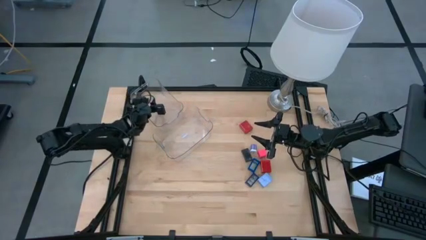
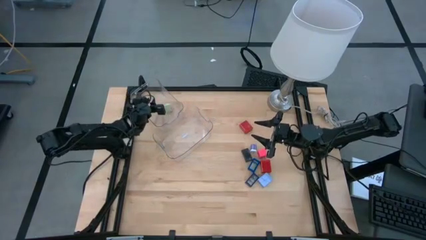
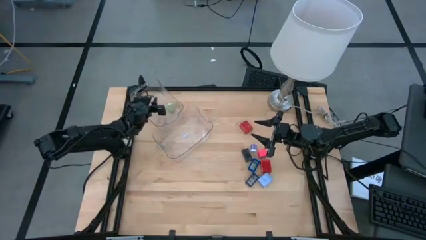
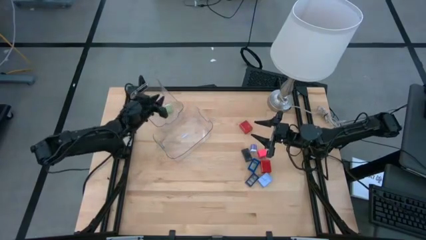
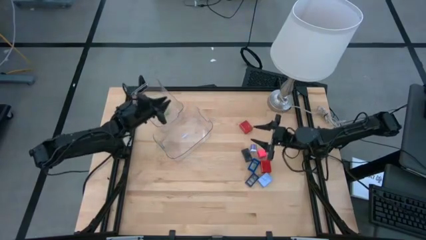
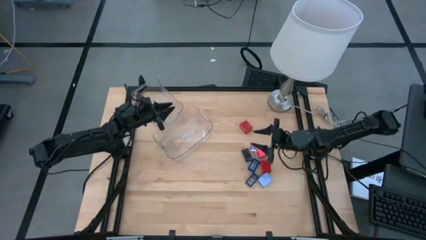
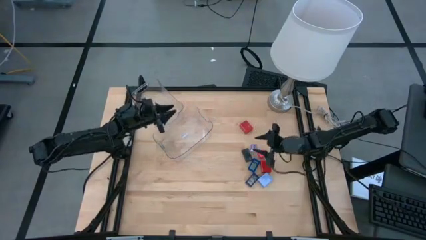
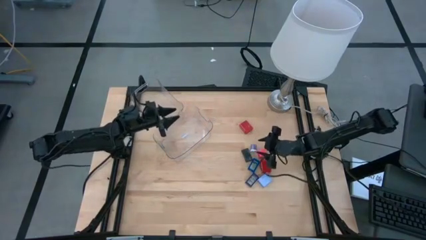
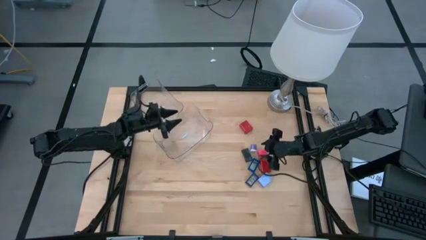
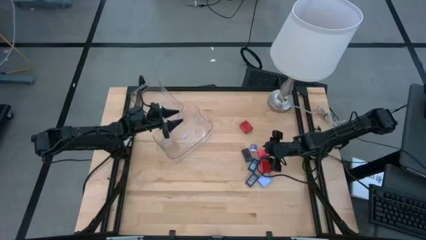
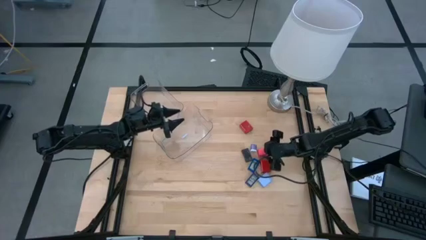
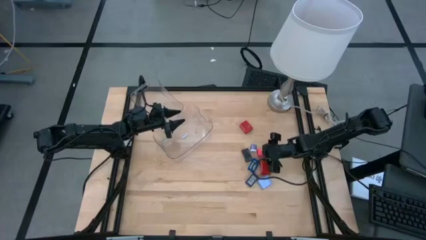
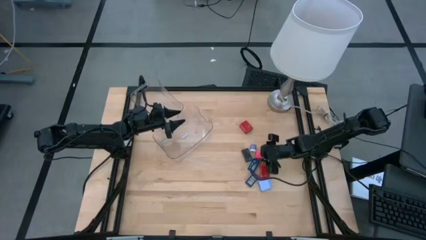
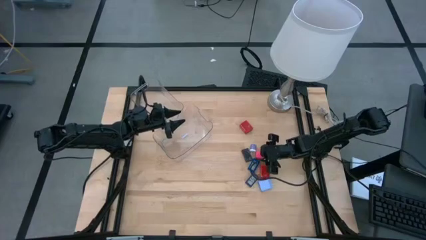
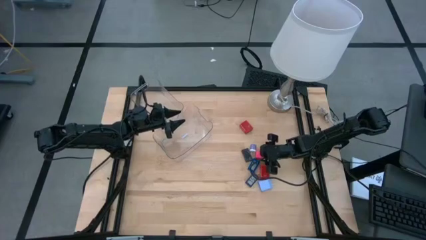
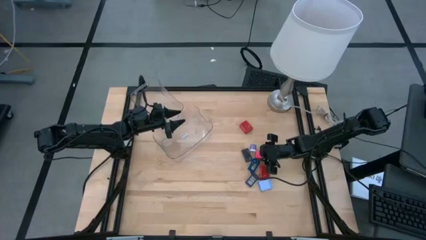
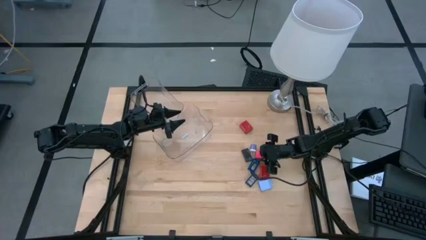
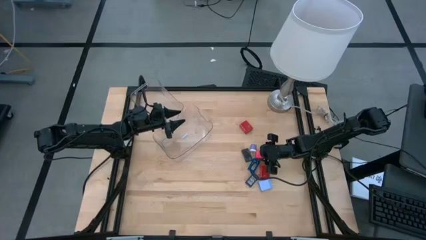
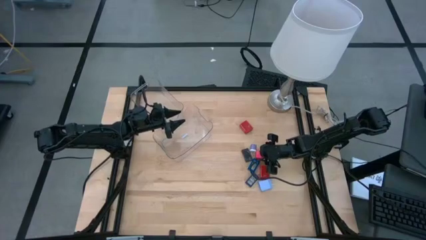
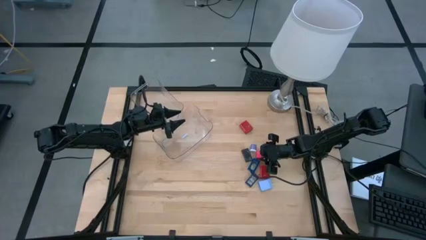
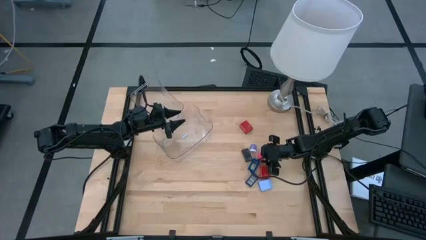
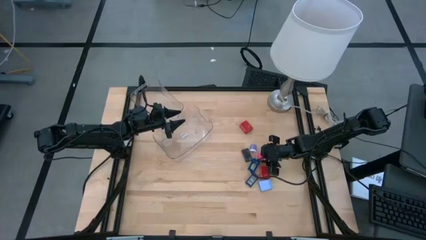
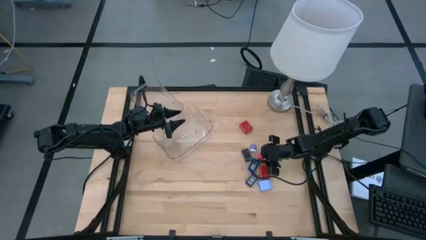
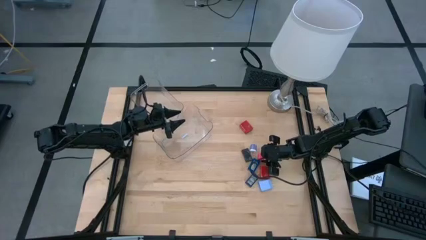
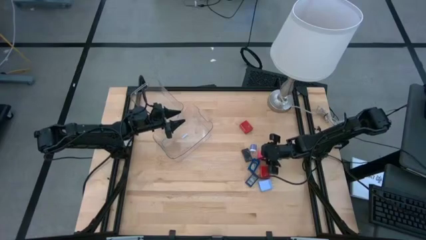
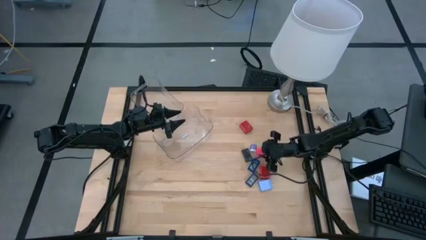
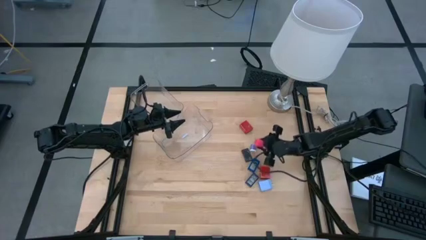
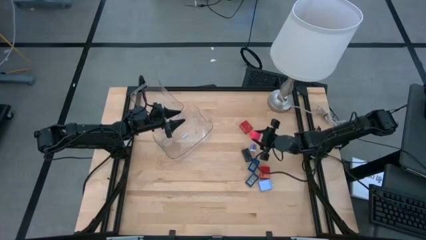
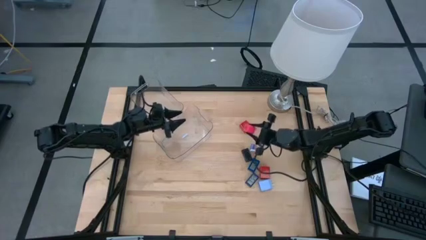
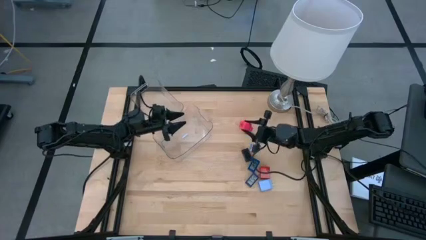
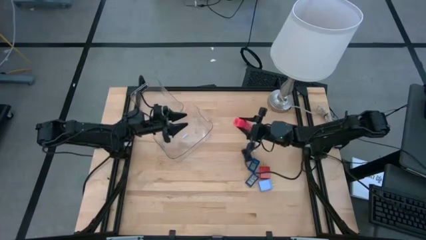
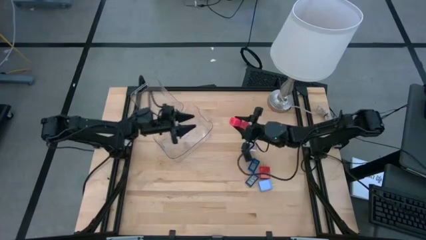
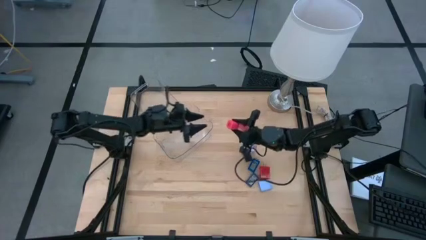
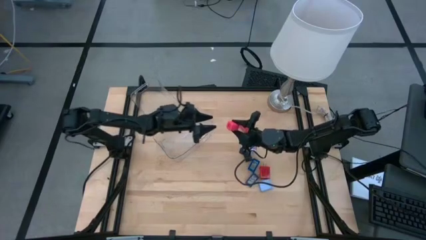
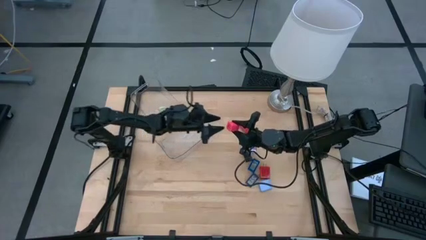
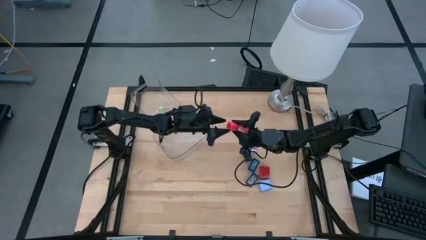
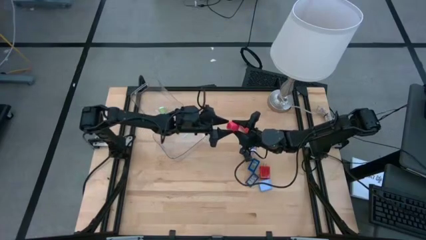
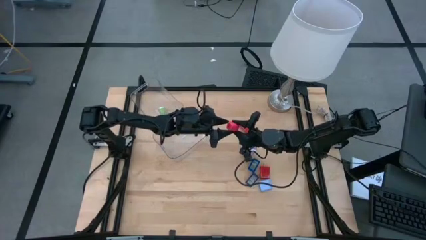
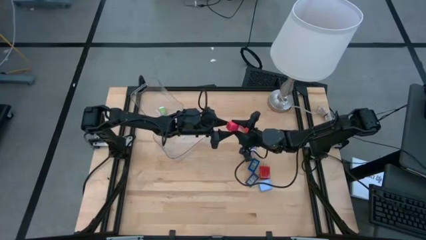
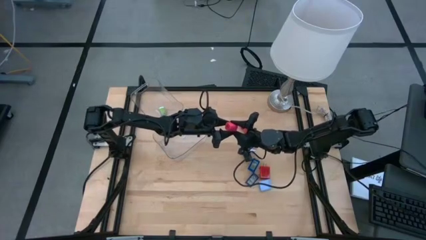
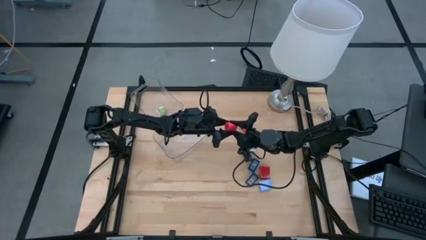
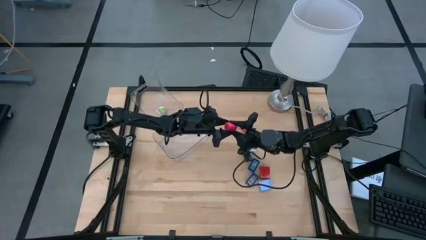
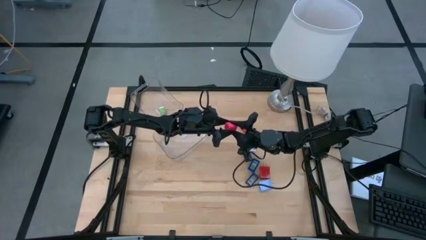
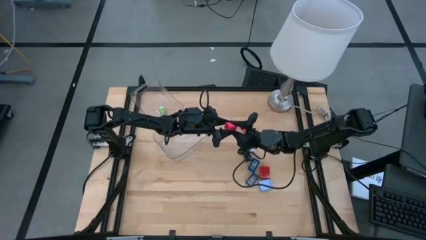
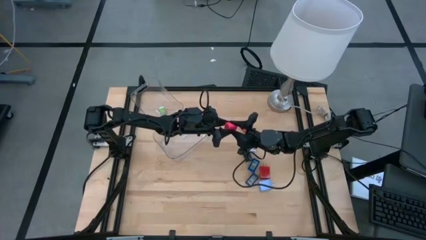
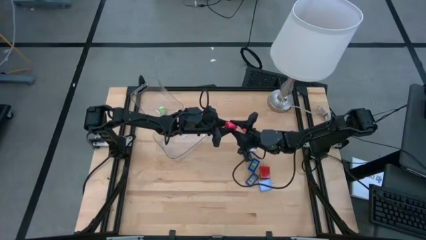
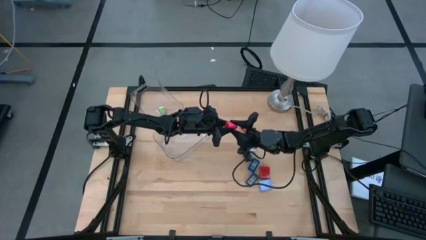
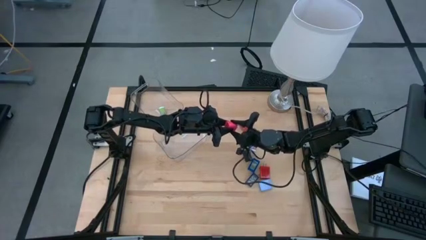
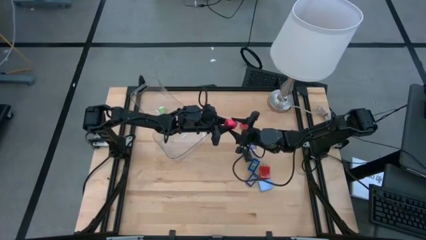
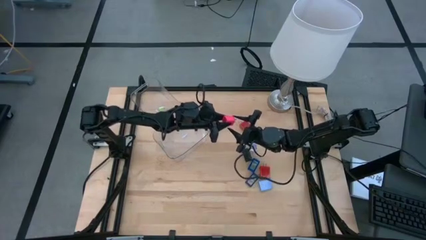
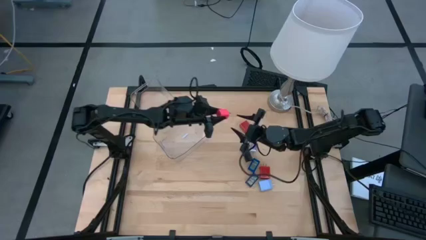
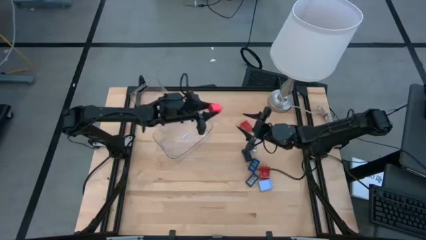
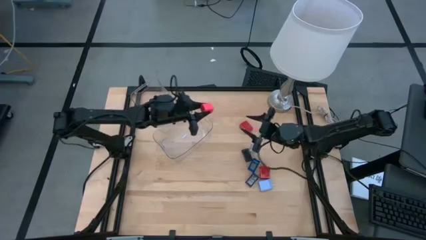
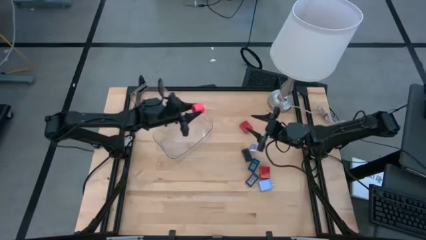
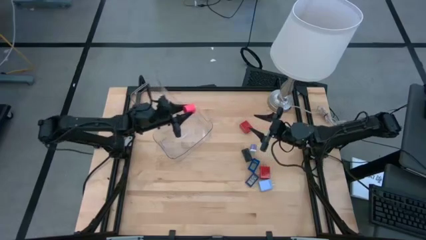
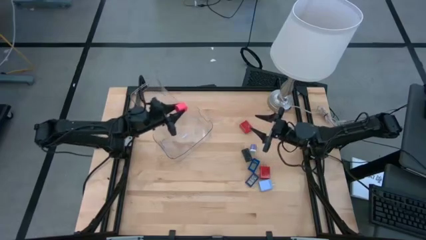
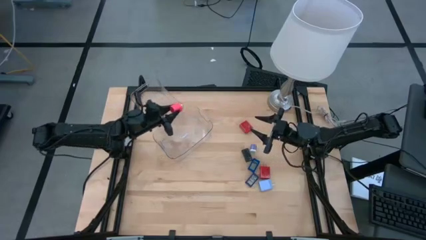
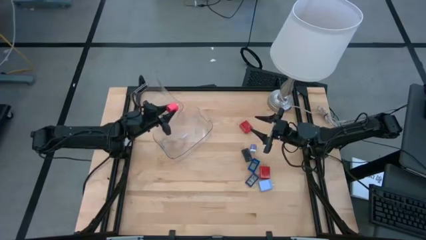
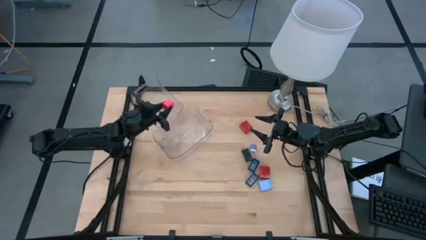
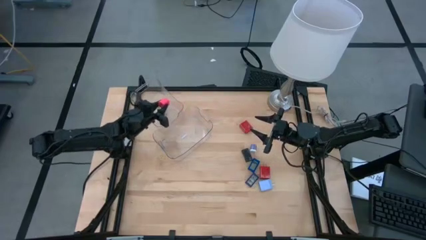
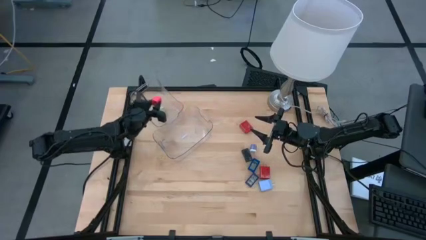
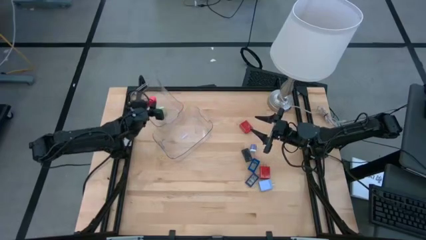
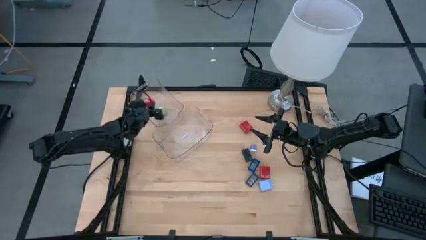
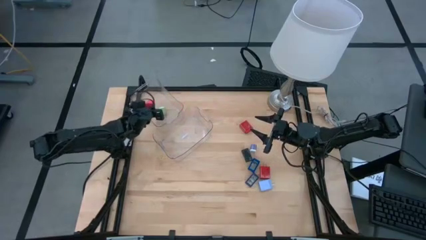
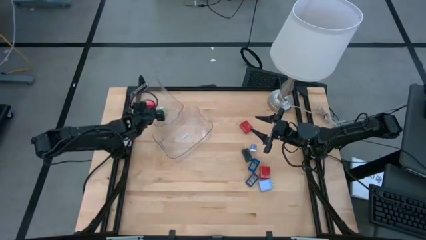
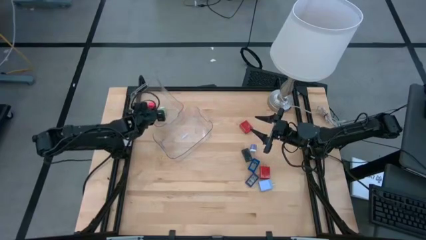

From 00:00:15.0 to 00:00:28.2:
Task: Pick & Place Office items
Put the pink charger adapter into the top transparent bin

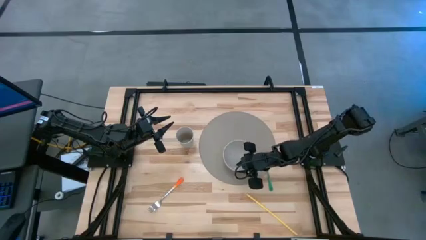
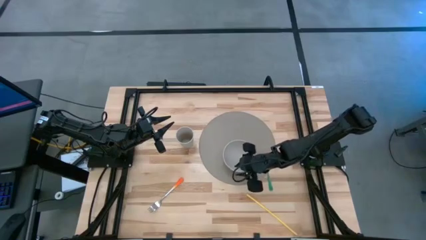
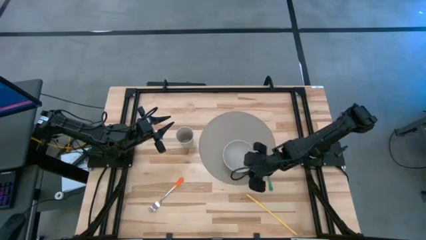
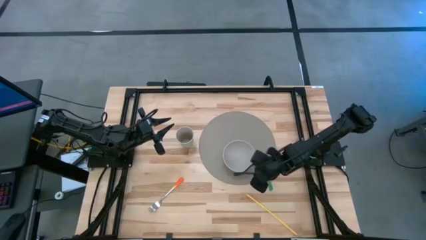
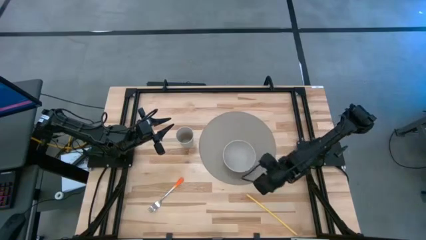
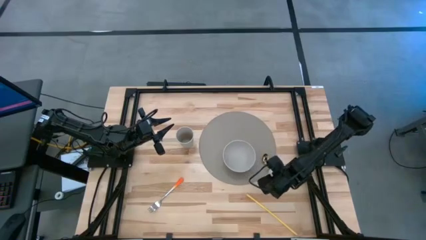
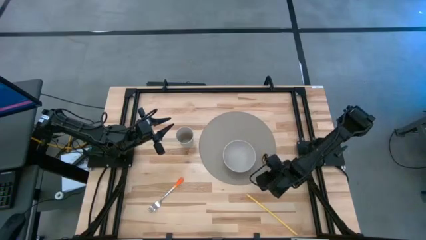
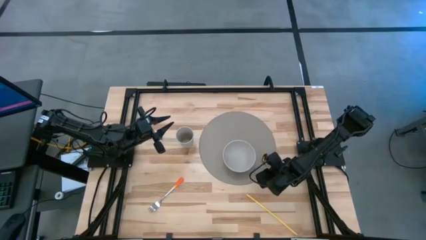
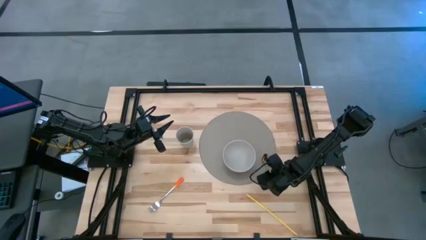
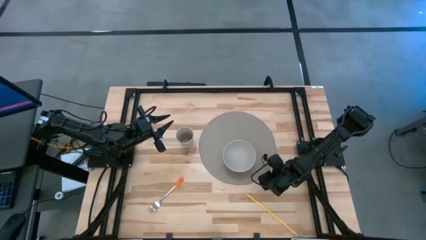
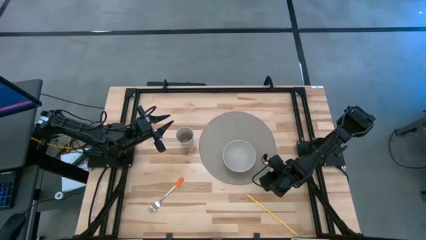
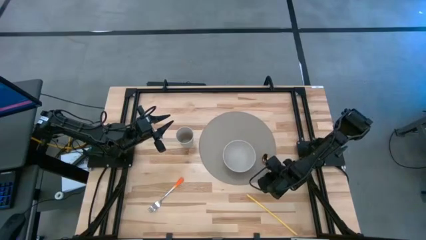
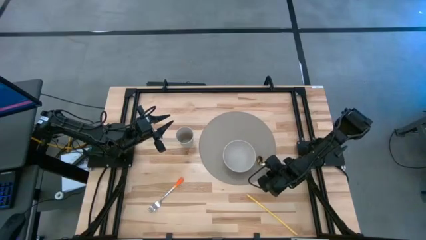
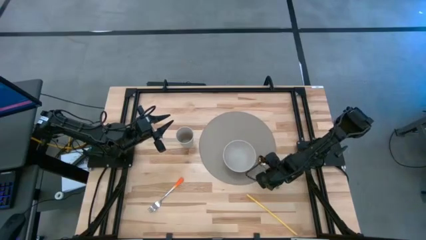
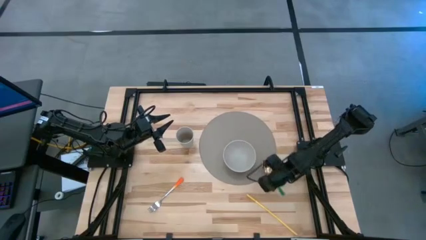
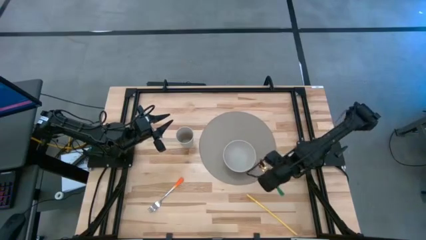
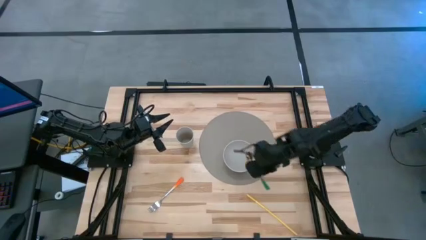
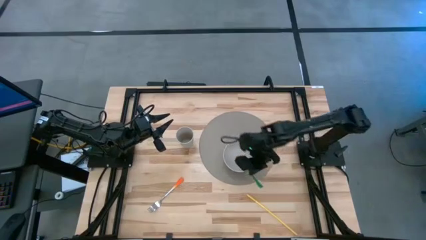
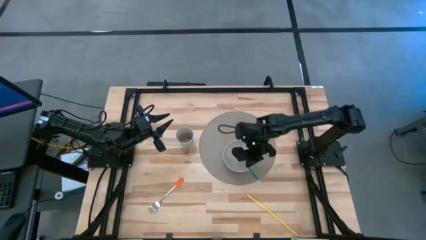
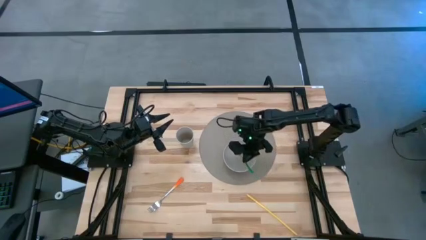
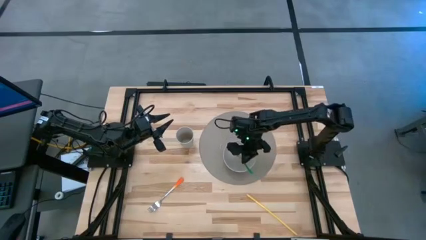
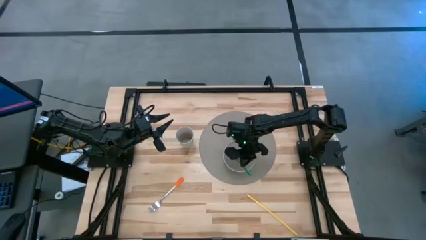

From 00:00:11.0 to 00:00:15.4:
Task: Pick & Place Utensil
Put the green spoon into the bowl
